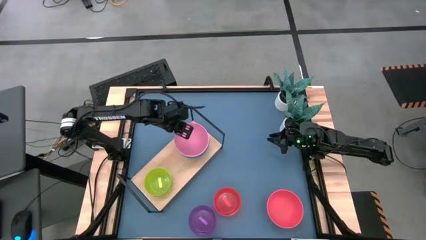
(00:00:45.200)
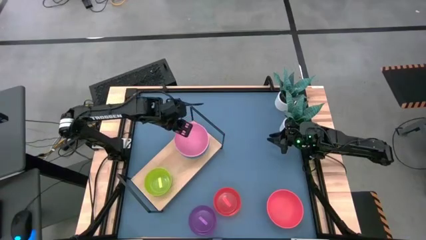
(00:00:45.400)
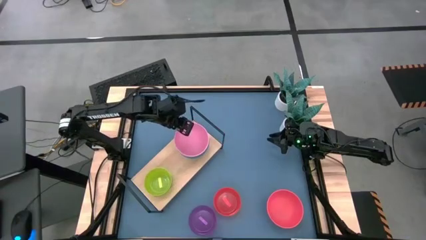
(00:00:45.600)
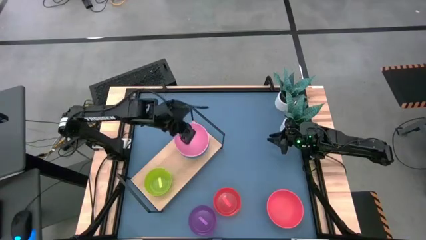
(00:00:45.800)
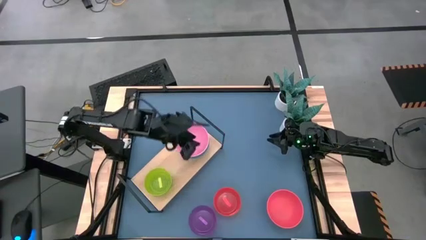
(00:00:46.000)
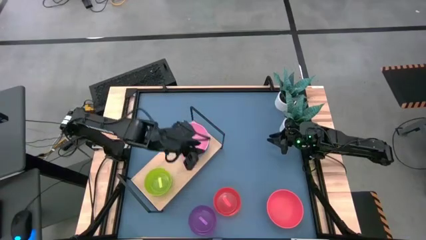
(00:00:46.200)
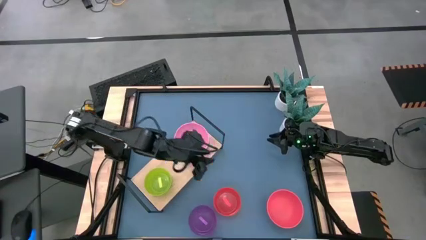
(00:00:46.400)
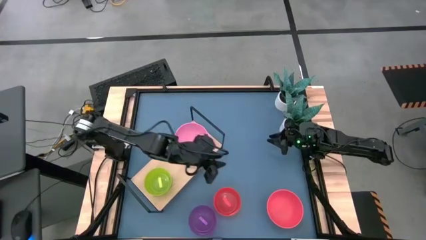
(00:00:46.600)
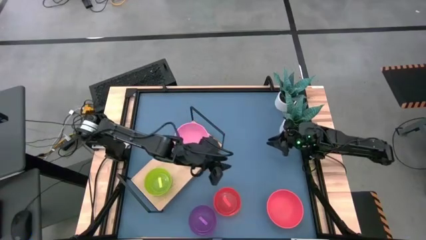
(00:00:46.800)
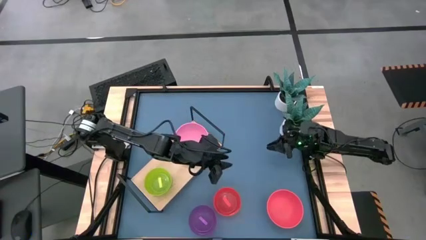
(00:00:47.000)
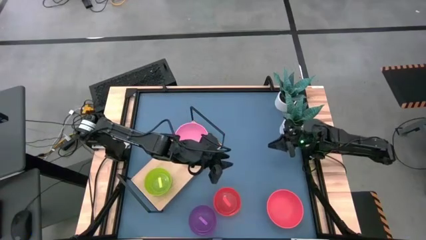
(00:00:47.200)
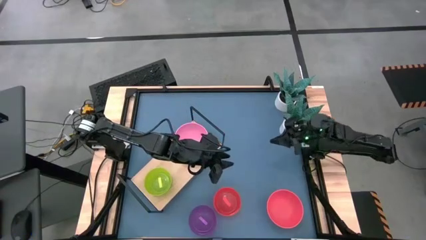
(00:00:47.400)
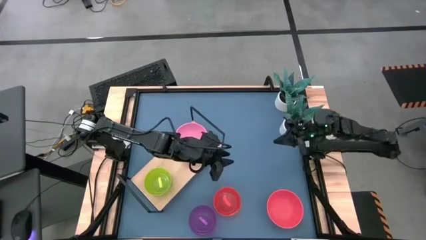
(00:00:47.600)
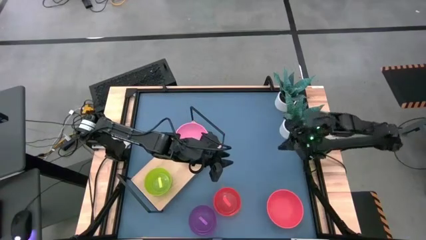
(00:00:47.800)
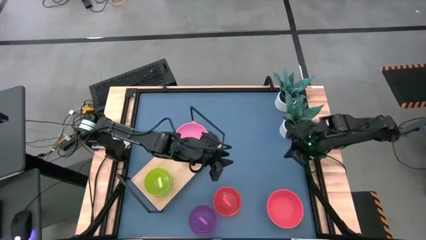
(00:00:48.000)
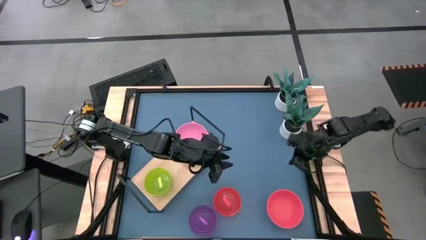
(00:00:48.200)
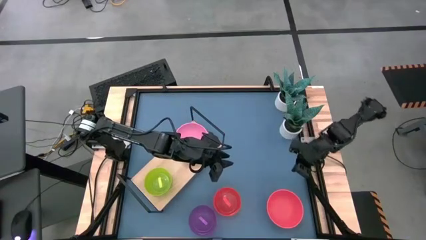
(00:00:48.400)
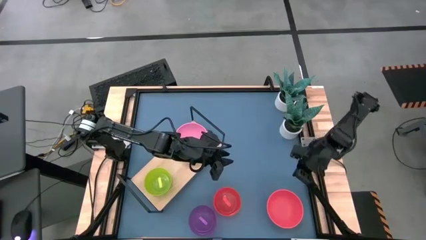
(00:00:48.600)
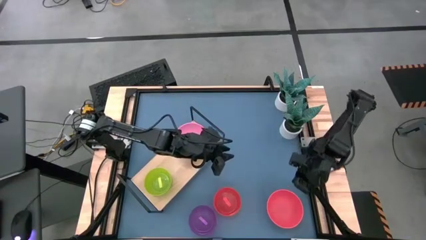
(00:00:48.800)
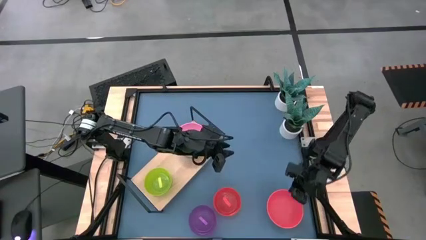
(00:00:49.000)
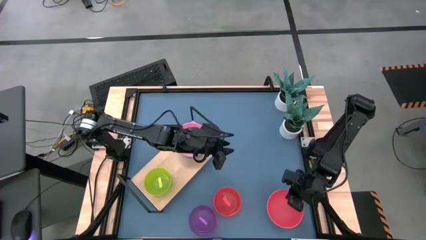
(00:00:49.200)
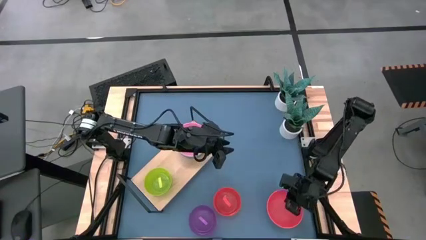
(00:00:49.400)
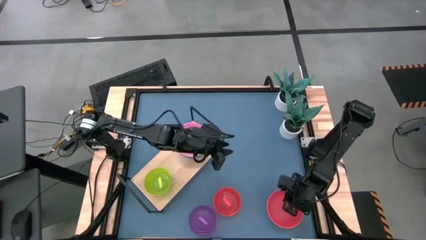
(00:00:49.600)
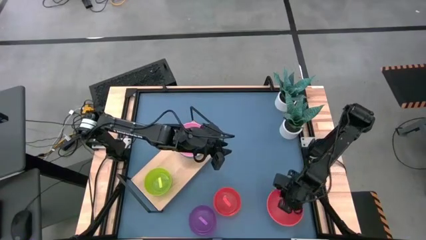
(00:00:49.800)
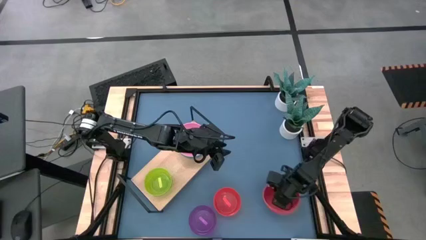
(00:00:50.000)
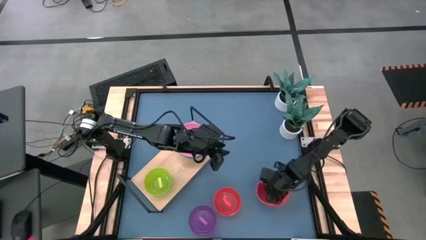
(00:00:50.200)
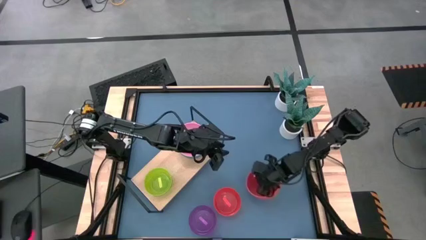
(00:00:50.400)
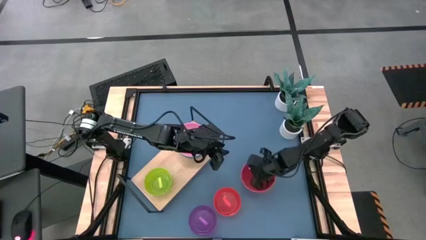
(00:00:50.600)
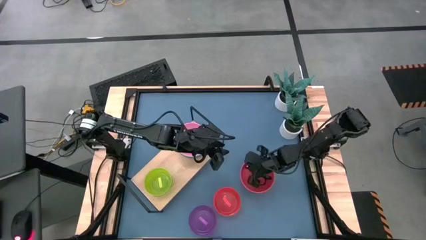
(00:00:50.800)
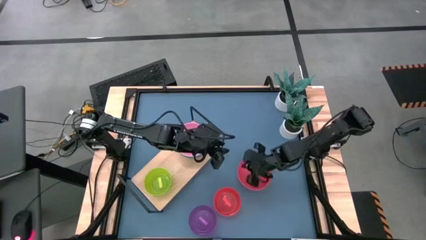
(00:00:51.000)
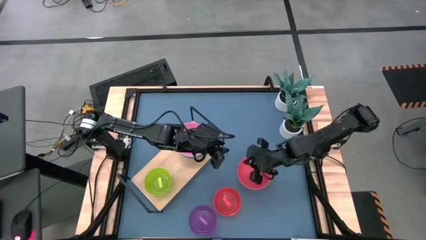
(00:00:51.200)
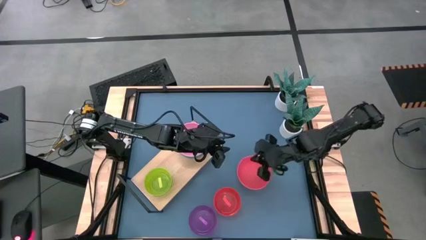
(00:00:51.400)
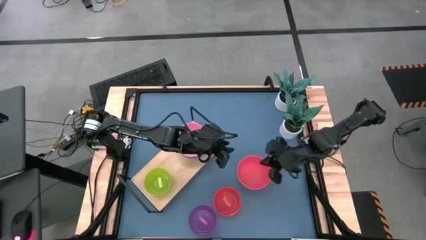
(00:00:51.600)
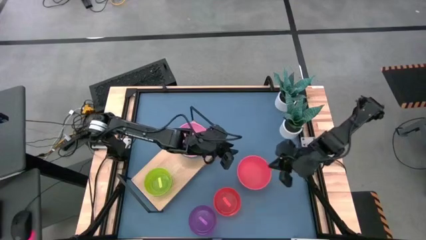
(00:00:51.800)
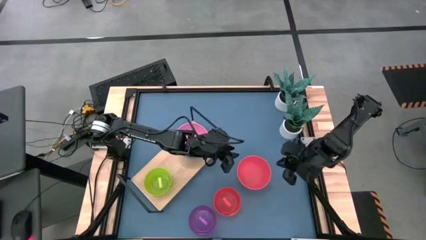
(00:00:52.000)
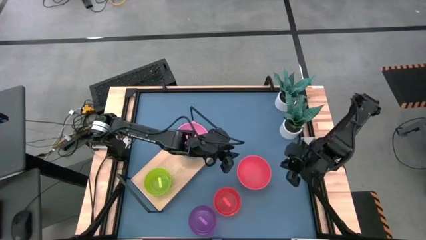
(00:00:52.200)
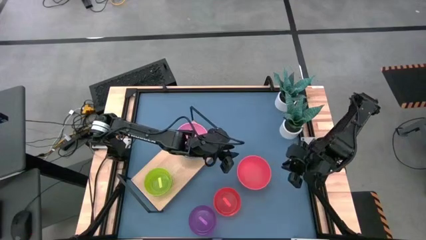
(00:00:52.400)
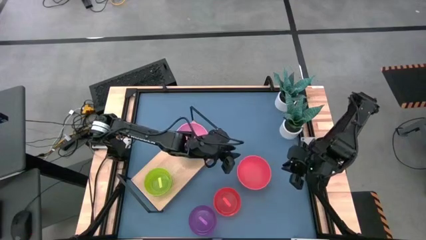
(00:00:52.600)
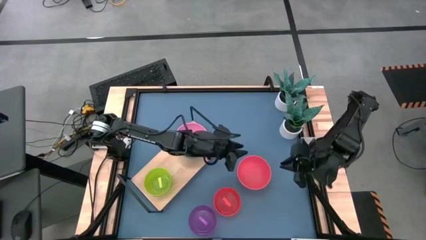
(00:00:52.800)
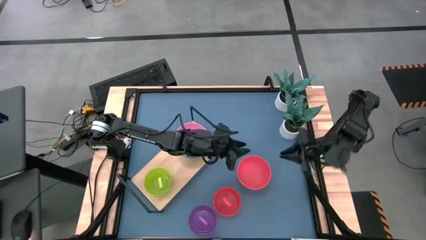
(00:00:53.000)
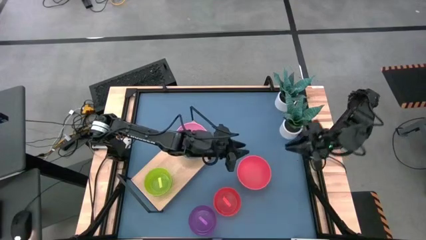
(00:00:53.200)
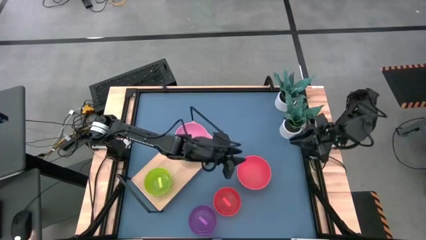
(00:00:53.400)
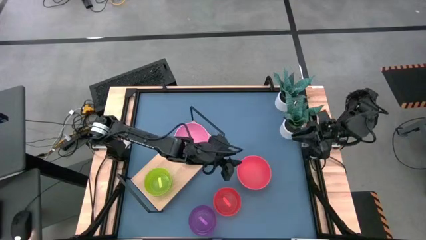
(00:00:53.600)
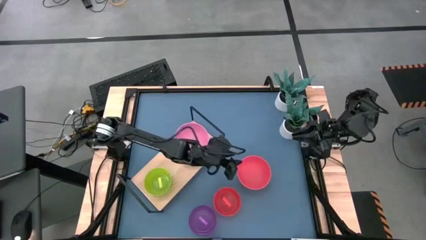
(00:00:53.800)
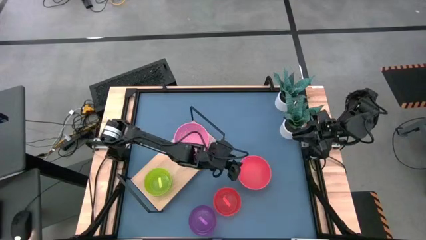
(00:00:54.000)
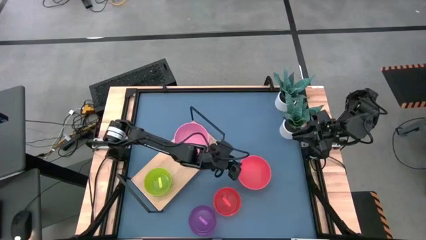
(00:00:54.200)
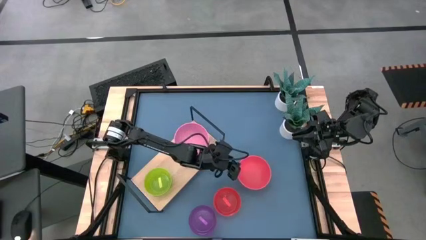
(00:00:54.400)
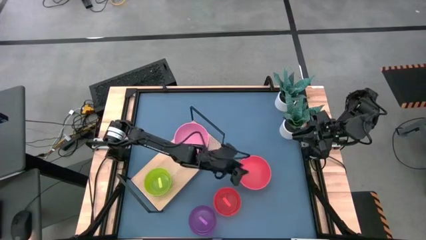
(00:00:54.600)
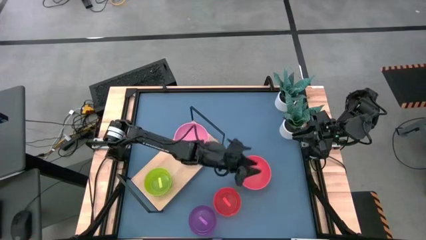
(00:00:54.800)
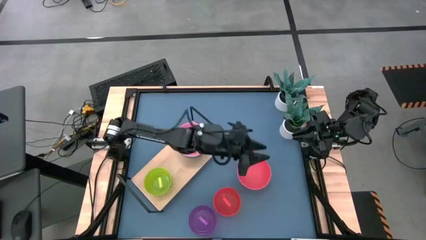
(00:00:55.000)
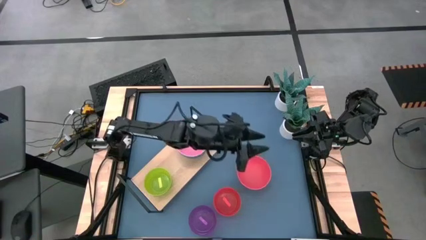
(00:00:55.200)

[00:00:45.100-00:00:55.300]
Task: Place and stack bowls onto a shelf
Stack the large orange bowl on top of the pink bowl on the shelf

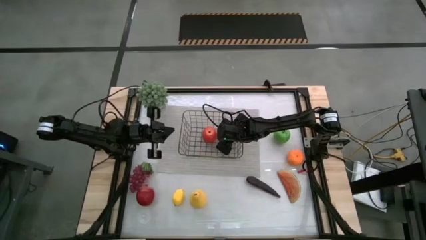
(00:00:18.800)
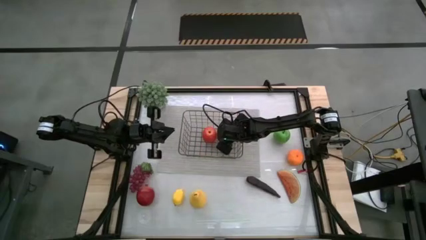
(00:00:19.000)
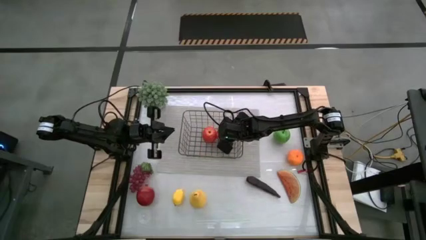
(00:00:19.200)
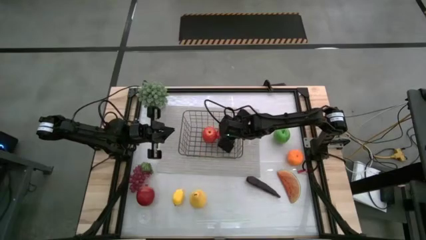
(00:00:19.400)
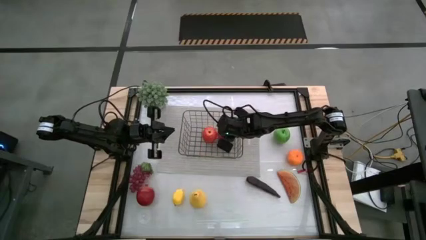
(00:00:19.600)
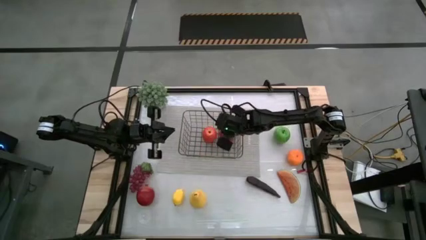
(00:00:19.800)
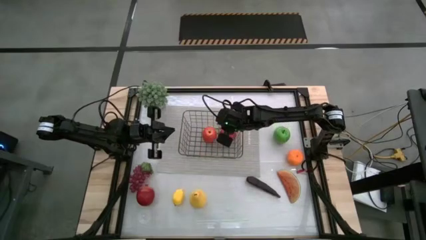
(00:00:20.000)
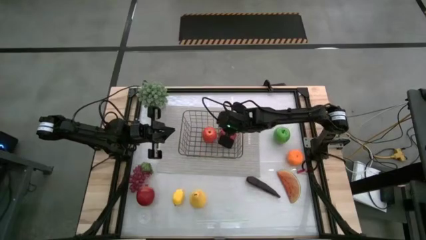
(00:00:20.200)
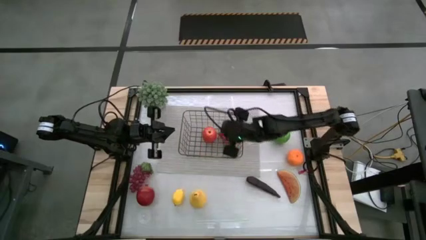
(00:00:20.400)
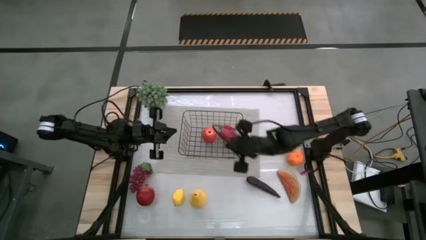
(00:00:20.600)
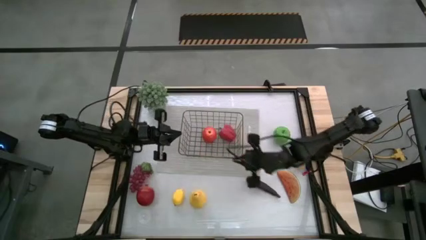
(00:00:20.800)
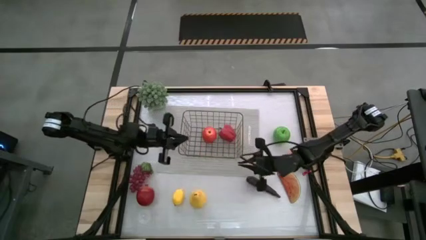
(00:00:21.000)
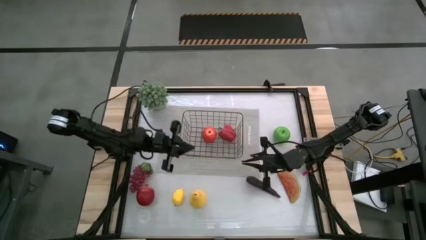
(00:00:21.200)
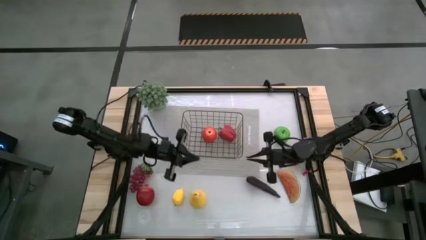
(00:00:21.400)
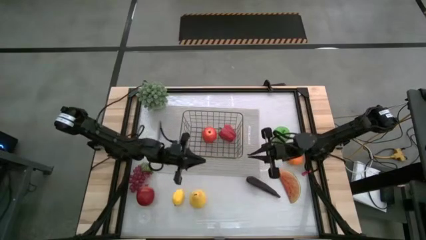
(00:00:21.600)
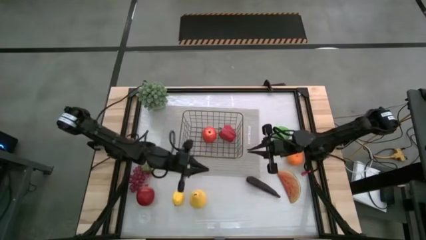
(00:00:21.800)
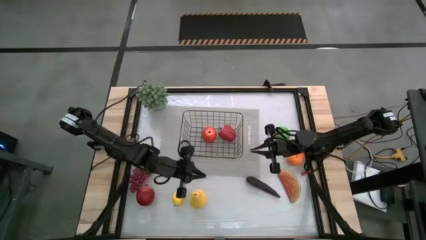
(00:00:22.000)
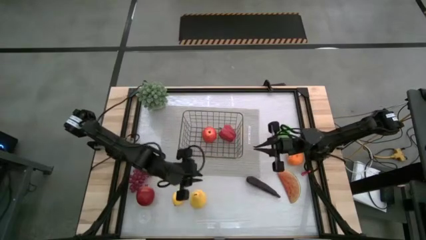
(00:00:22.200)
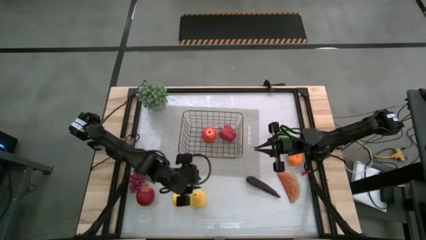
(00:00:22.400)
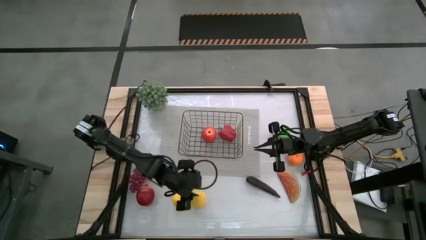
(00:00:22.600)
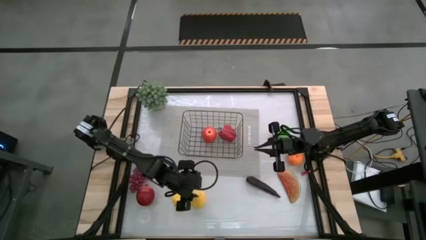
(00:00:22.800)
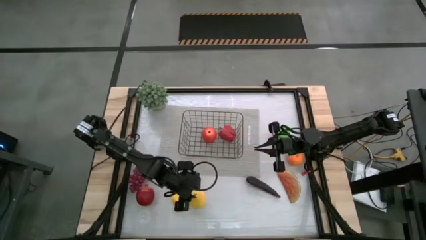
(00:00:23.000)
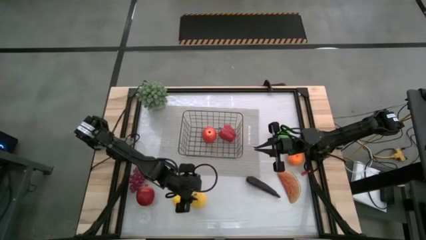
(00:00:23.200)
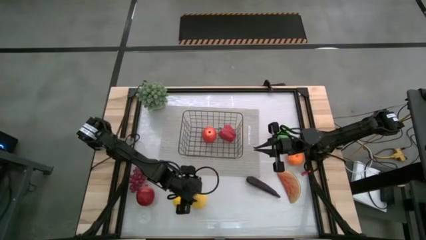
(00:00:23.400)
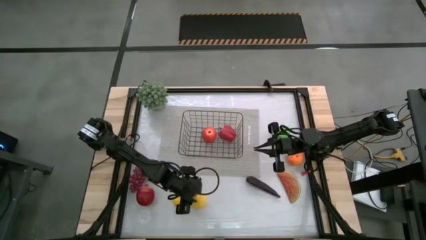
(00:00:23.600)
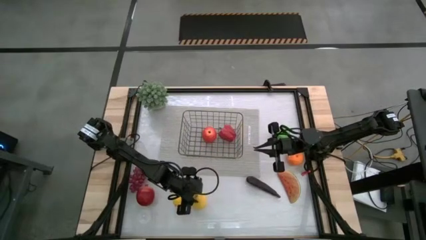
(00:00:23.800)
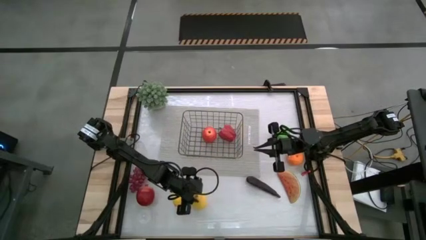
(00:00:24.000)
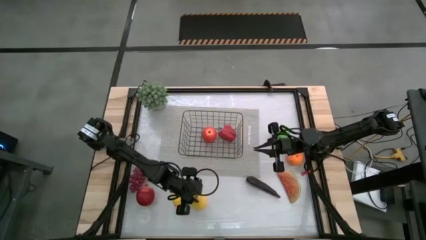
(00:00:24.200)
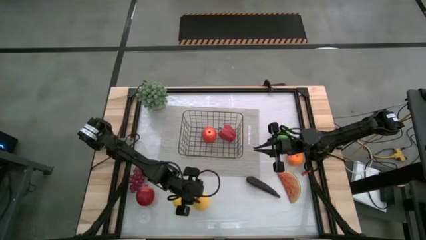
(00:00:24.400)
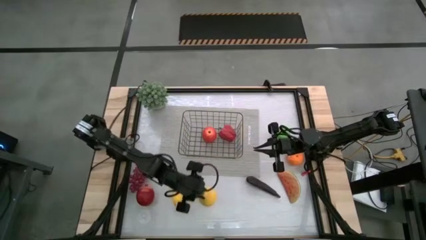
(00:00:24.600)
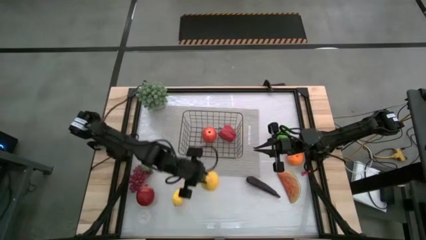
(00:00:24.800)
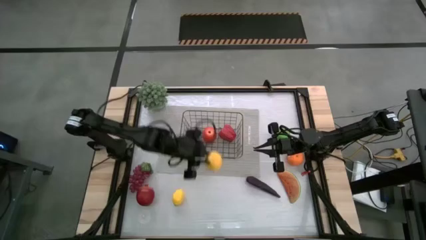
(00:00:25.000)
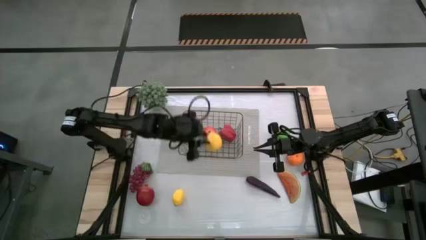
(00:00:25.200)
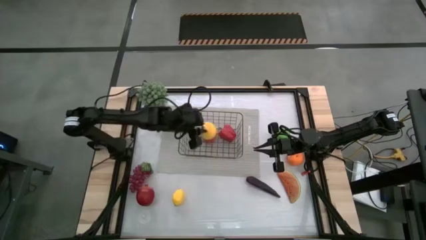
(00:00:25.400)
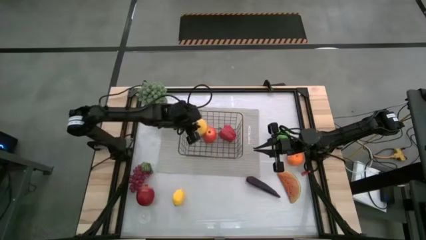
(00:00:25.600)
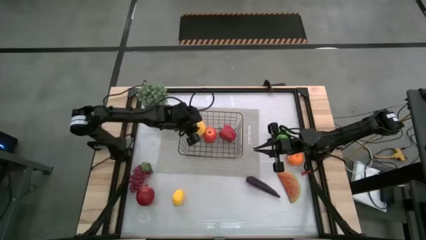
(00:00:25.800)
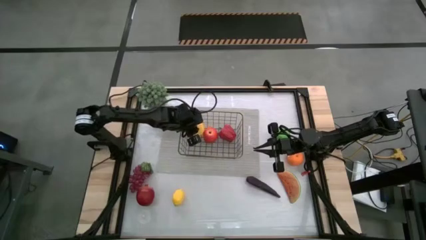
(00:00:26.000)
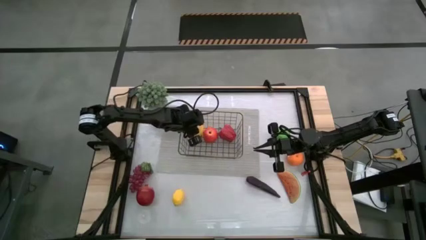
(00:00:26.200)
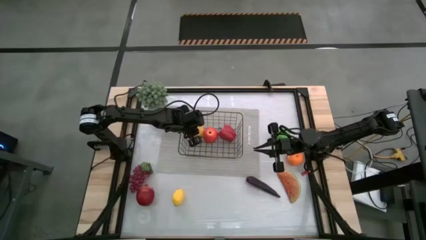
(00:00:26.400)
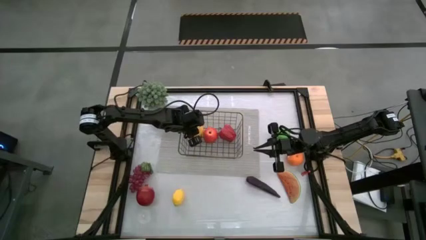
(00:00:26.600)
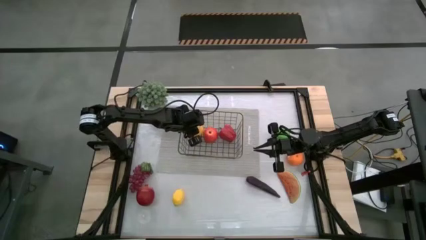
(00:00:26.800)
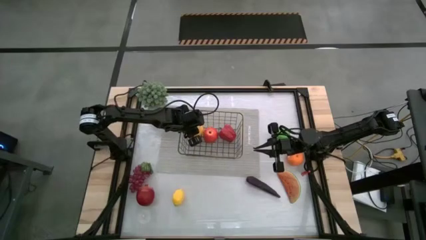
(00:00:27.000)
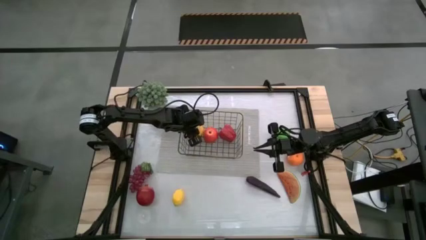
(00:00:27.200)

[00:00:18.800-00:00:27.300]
Task: Build produce basket
Put the pear into the wire basket
